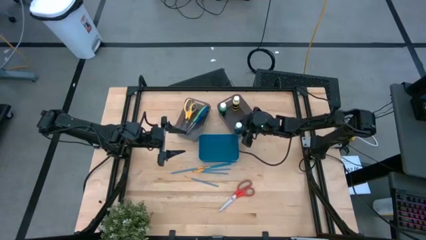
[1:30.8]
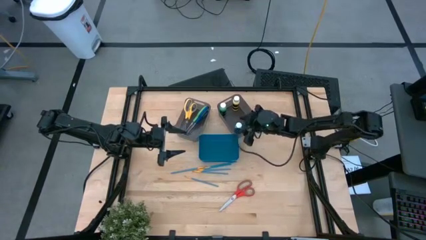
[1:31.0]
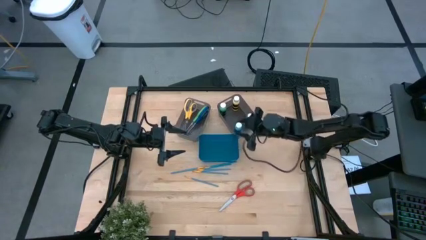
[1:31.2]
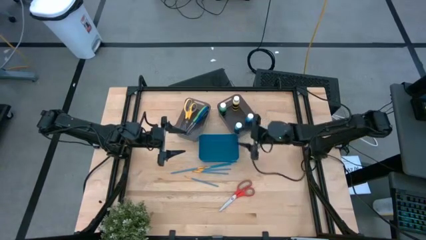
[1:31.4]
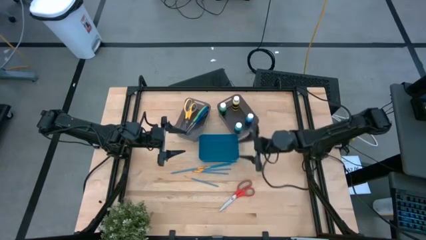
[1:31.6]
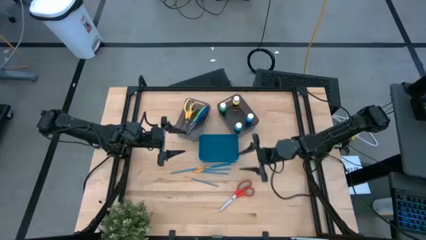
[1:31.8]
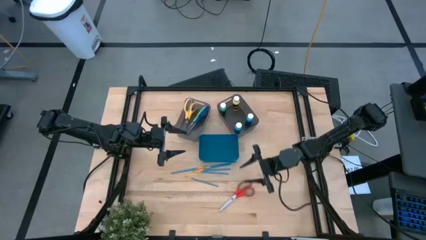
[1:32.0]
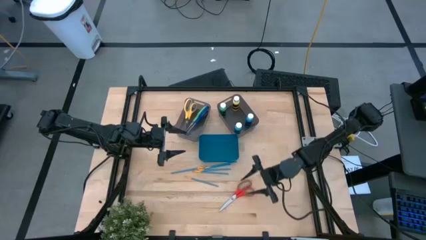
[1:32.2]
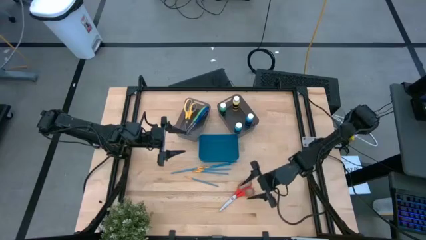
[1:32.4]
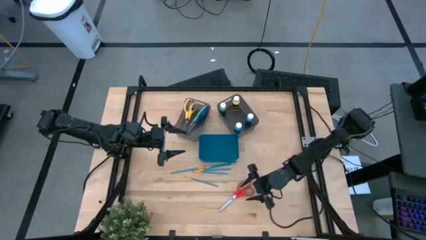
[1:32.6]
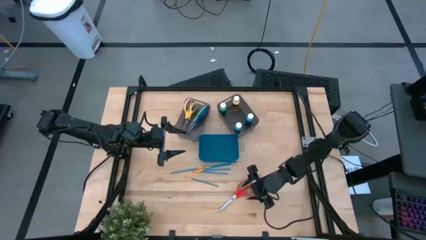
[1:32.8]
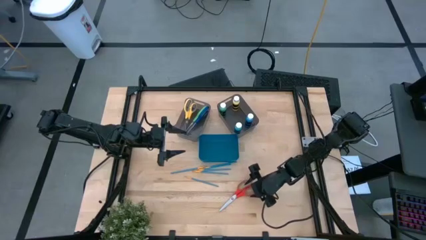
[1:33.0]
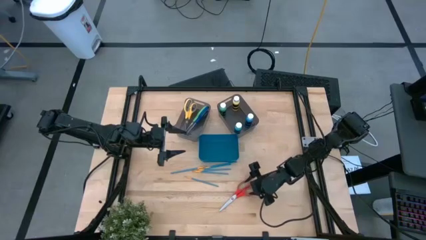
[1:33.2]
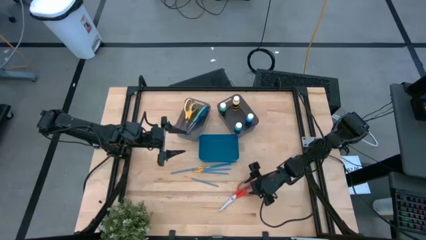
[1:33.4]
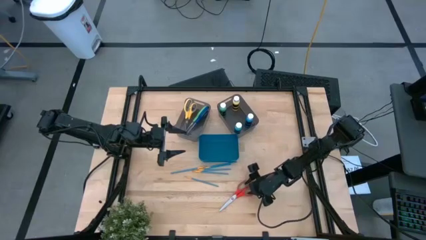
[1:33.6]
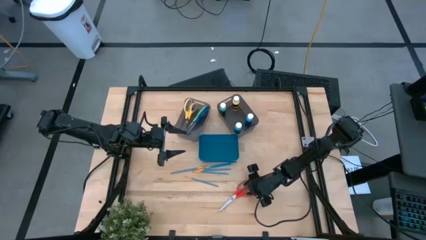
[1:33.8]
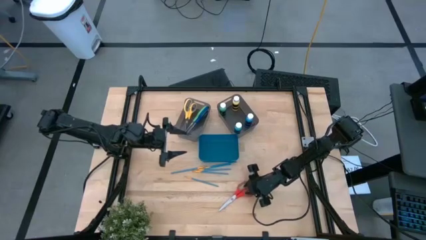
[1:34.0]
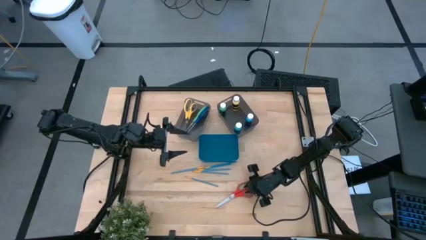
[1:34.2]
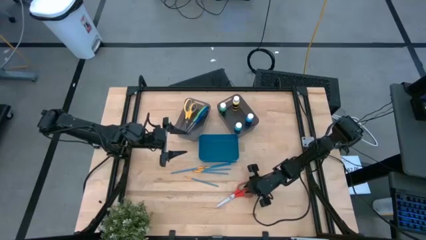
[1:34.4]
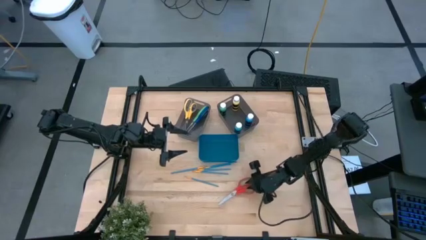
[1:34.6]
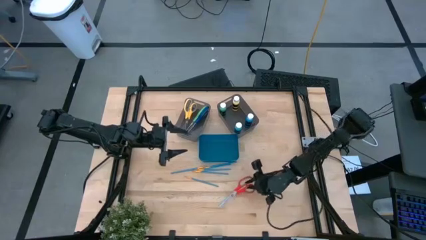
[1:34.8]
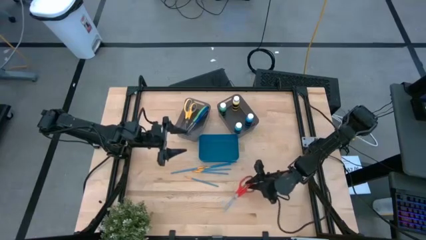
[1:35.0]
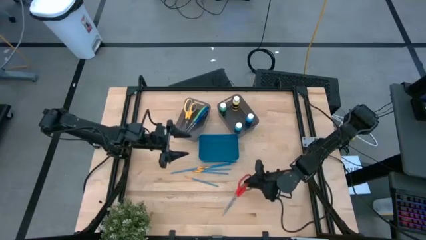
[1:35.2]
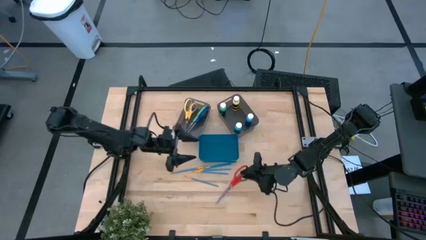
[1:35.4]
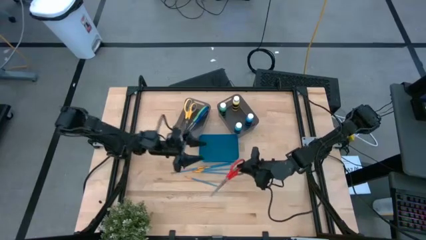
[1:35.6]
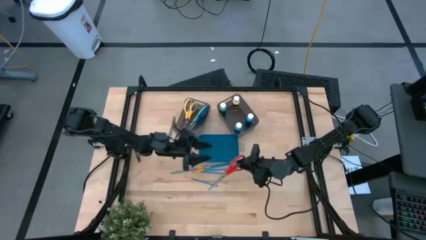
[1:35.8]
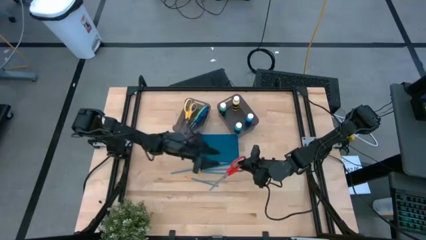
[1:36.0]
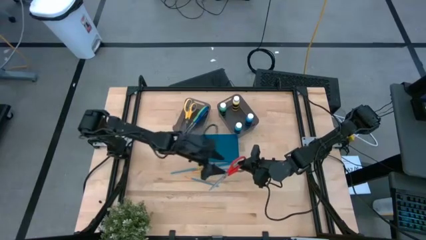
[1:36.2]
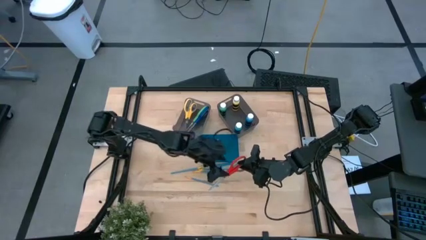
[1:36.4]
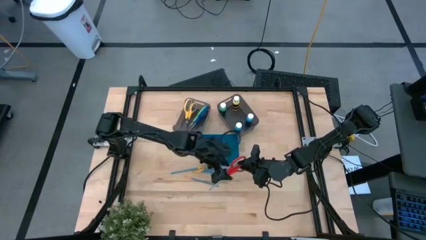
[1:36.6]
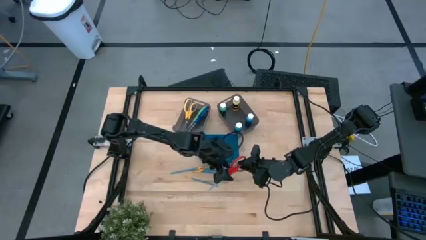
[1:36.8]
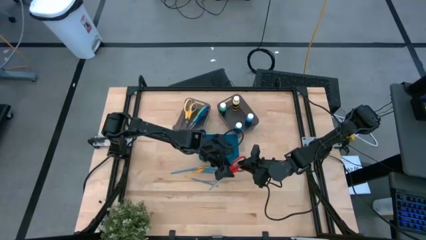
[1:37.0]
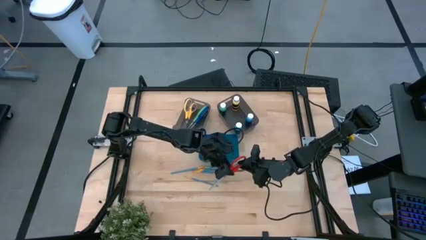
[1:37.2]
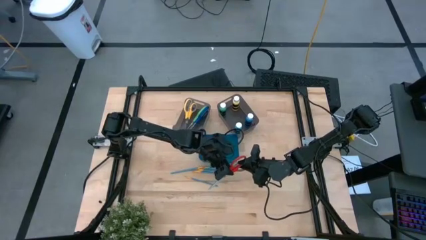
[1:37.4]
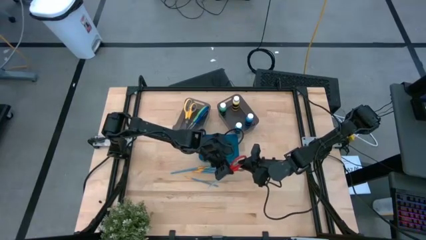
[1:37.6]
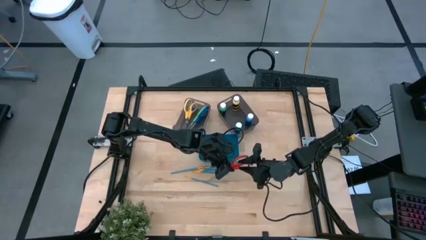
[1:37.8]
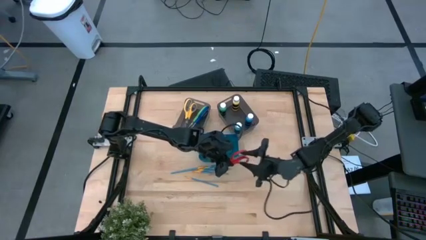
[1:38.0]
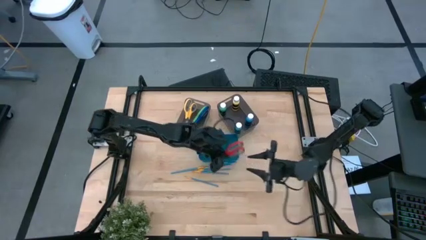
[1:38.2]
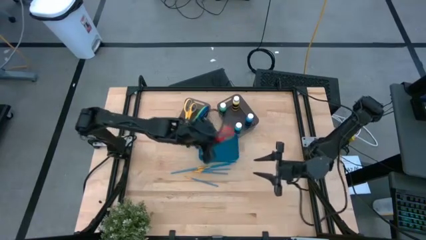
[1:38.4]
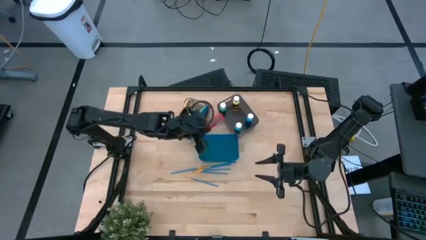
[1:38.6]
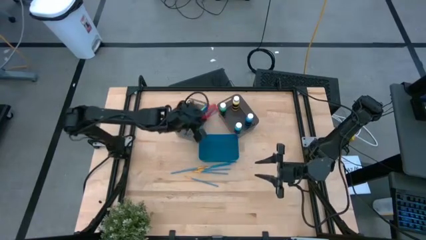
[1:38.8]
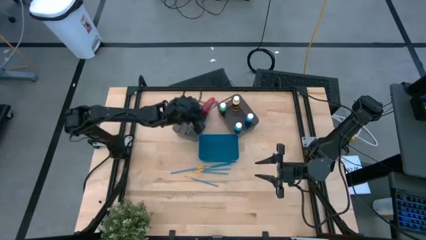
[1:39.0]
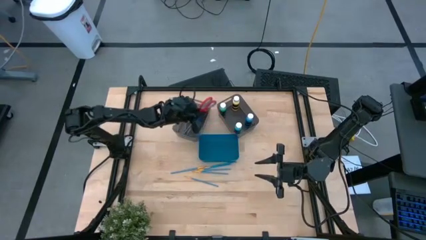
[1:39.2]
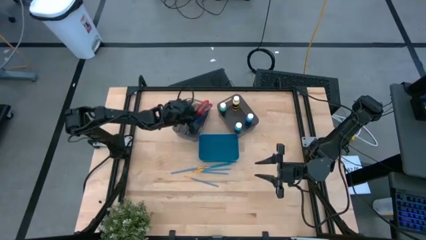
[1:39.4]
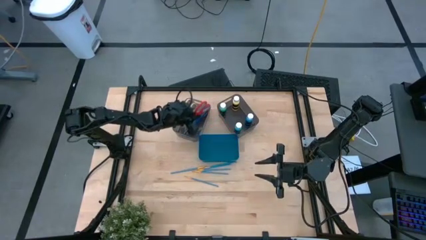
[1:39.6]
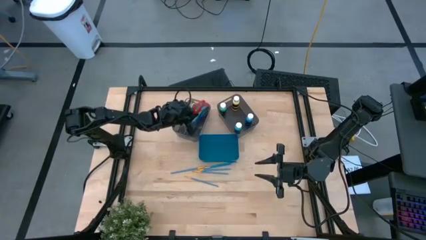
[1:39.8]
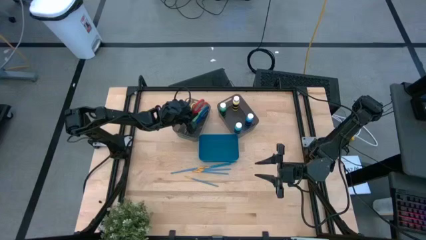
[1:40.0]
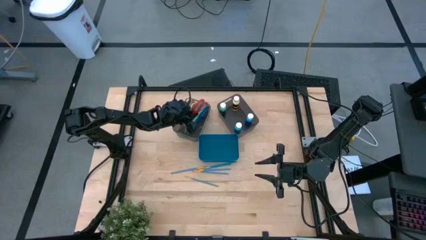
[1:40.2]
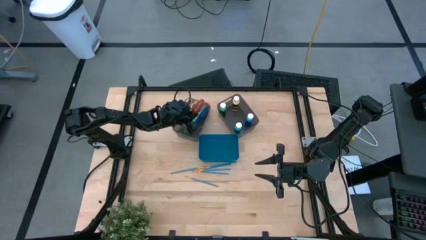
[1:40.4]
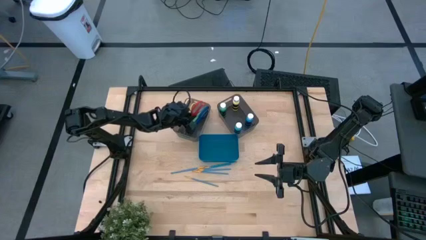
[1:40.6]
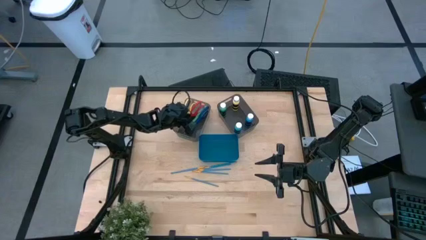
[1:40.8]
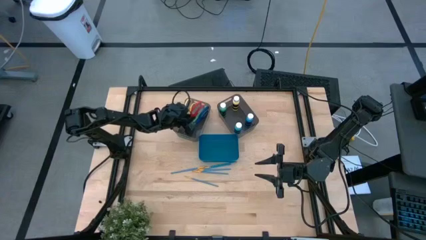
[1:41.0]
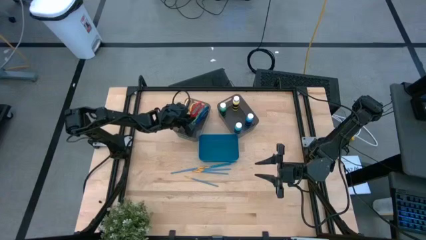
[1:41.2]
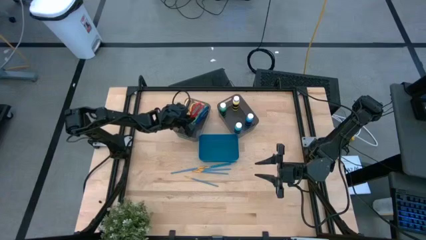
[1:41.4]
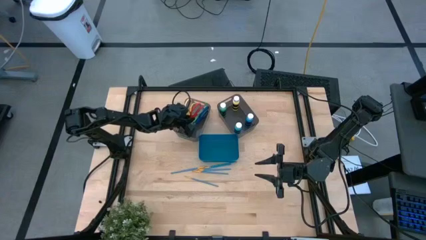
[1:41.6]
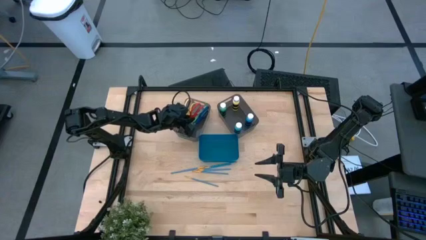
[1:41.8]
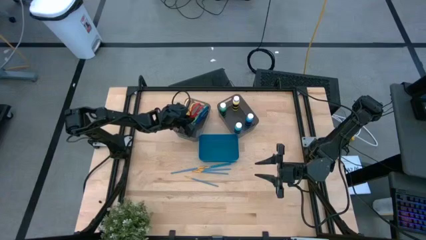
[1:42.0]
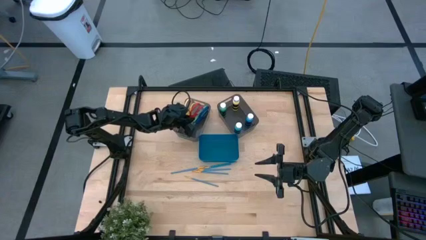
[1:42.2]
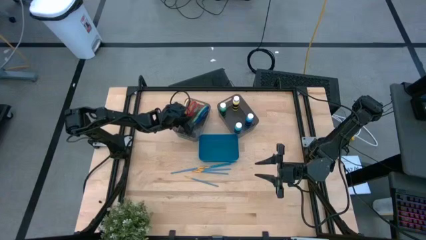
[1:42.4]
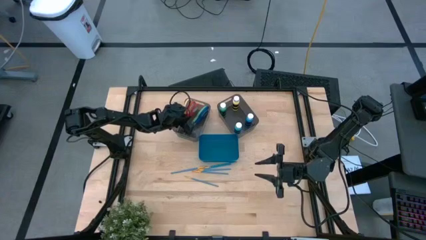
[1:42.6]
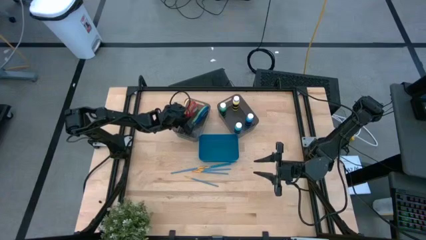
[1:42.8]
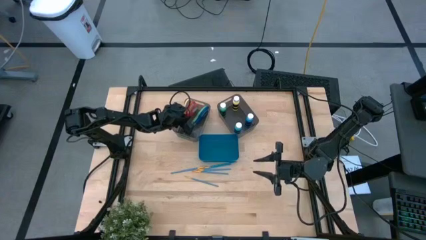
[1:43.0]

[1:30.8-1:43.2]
Task: Pick & Place Paint Supplies
Put the red scissors into the left black bin
